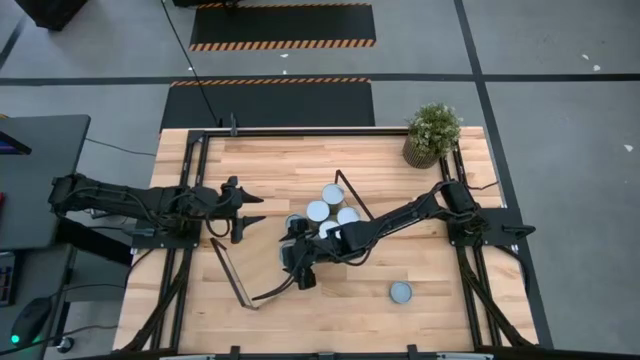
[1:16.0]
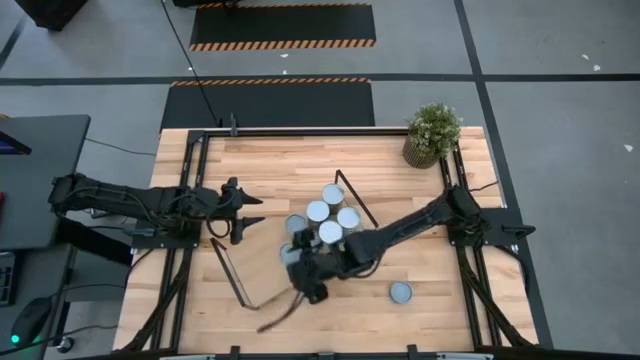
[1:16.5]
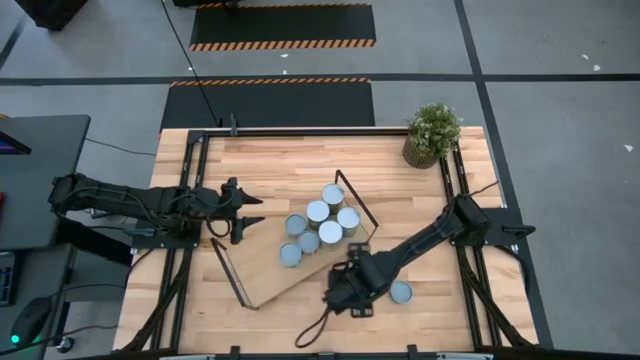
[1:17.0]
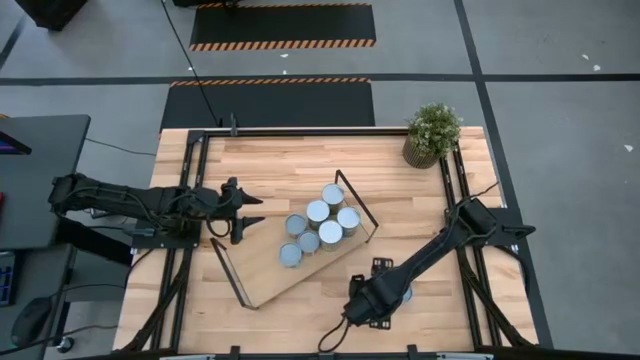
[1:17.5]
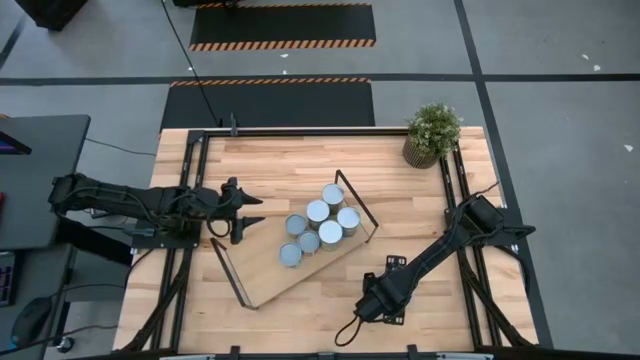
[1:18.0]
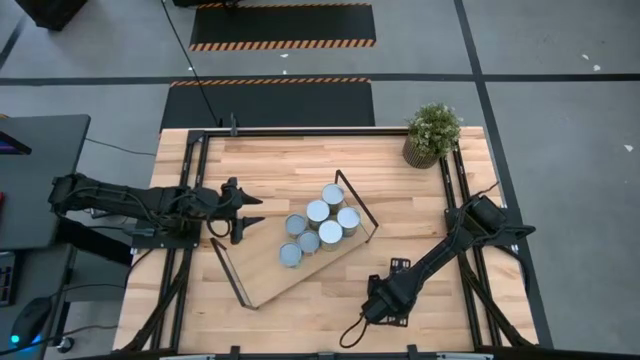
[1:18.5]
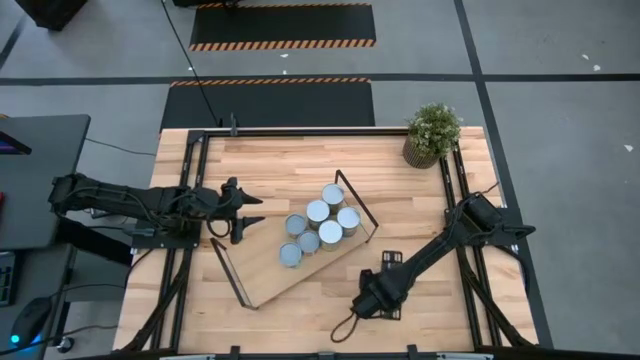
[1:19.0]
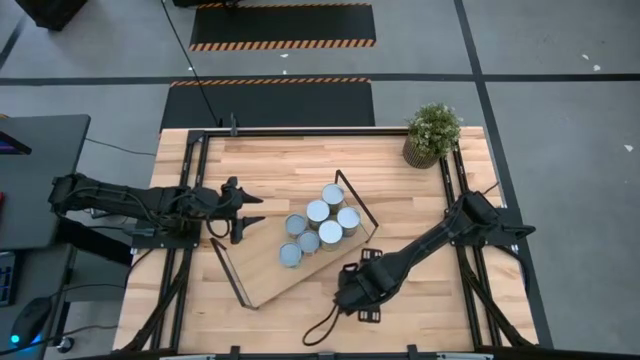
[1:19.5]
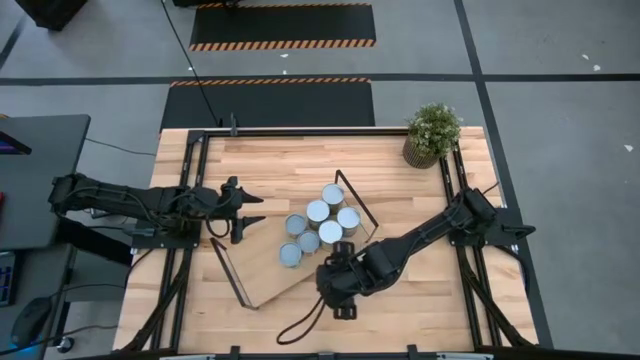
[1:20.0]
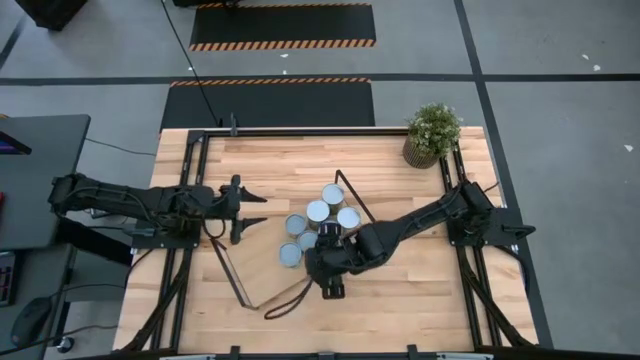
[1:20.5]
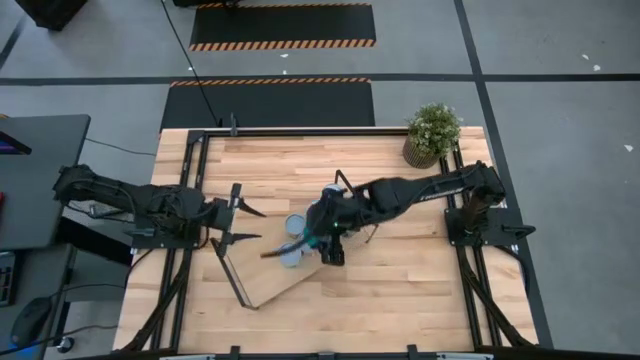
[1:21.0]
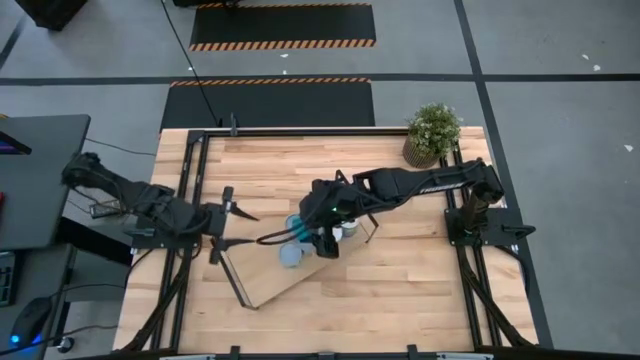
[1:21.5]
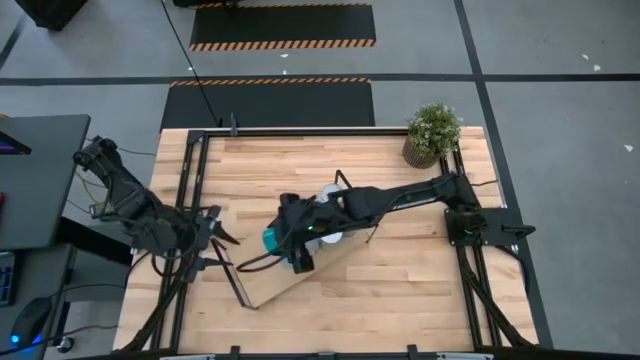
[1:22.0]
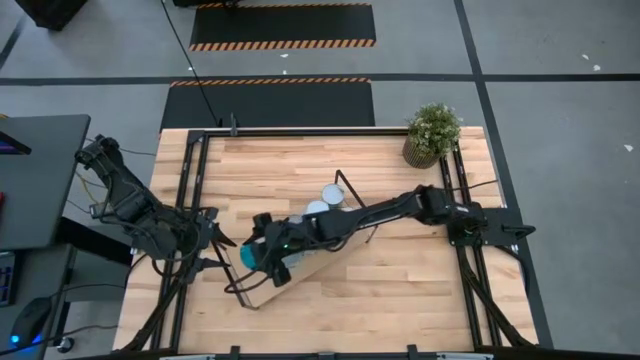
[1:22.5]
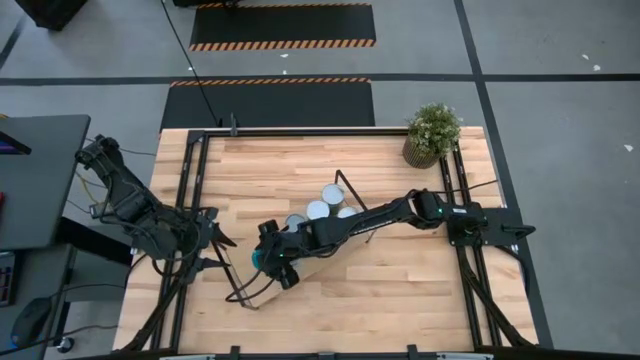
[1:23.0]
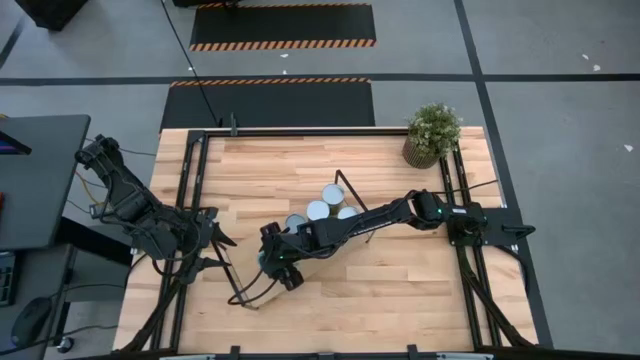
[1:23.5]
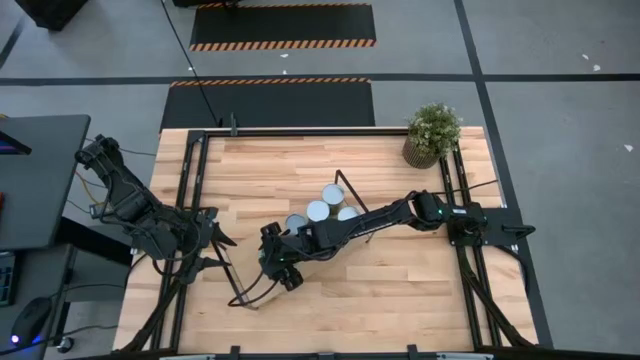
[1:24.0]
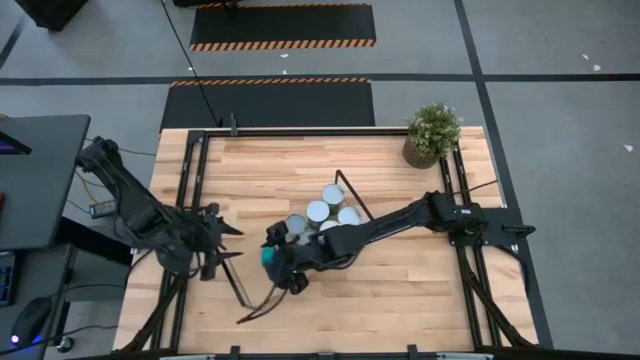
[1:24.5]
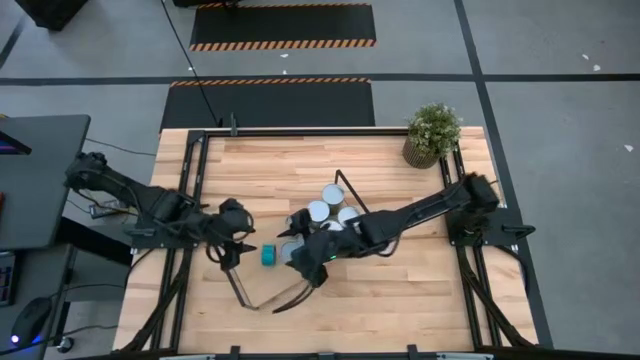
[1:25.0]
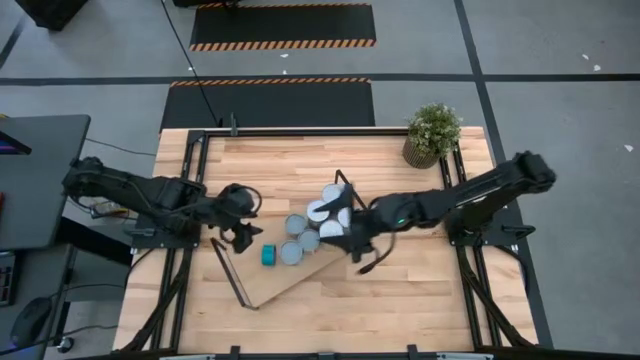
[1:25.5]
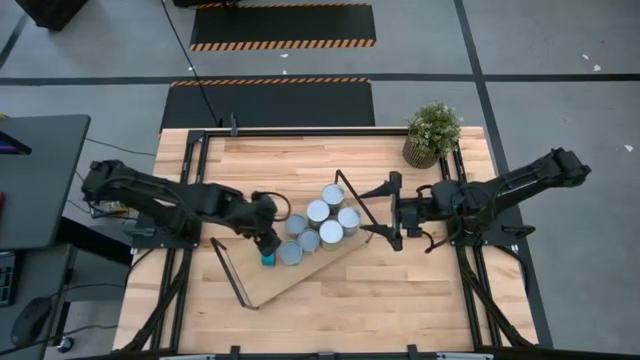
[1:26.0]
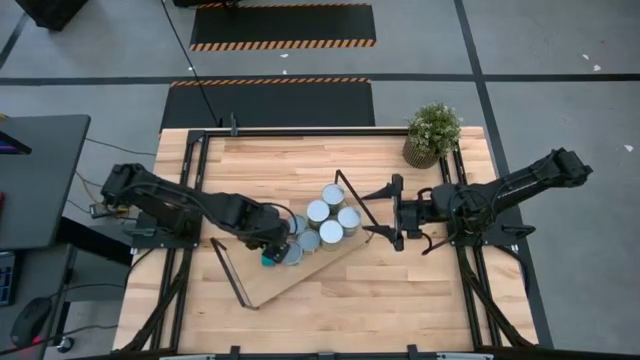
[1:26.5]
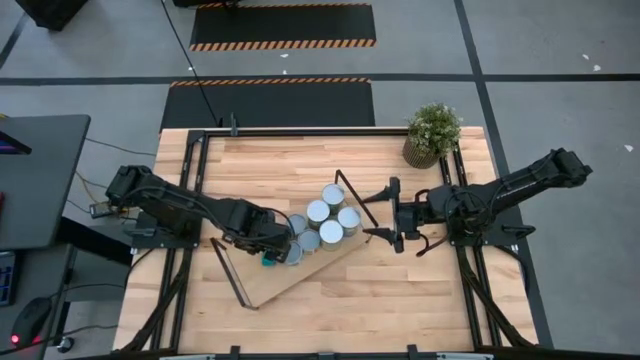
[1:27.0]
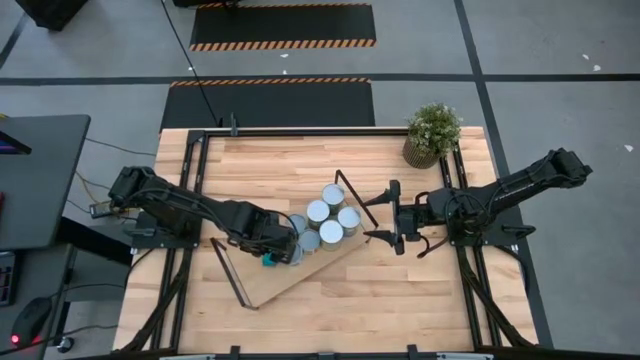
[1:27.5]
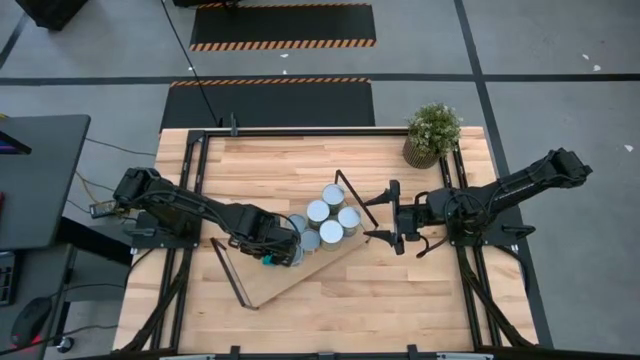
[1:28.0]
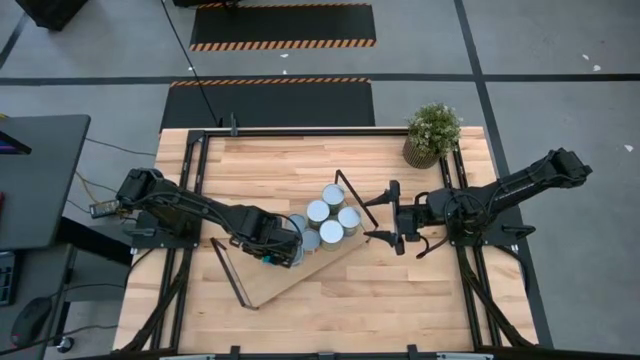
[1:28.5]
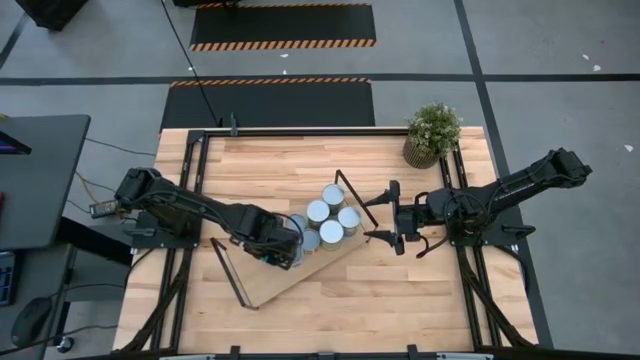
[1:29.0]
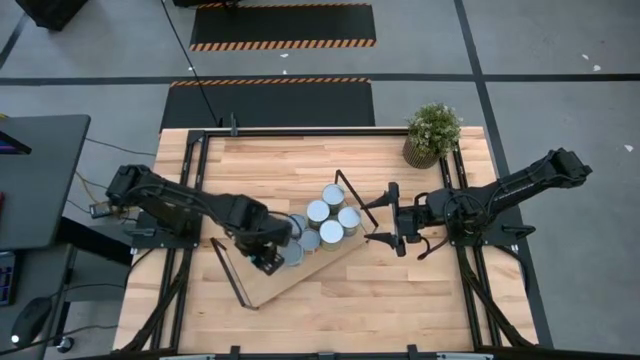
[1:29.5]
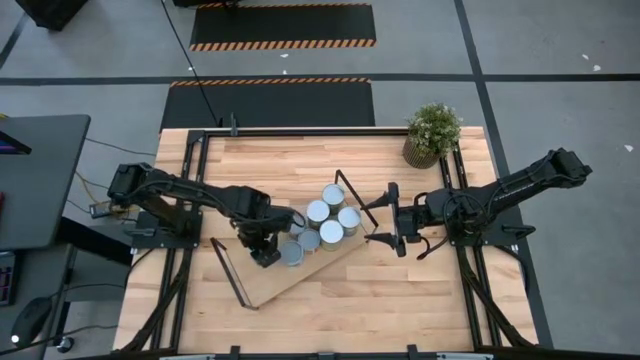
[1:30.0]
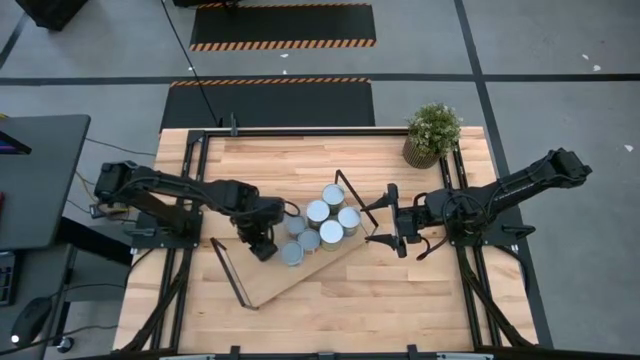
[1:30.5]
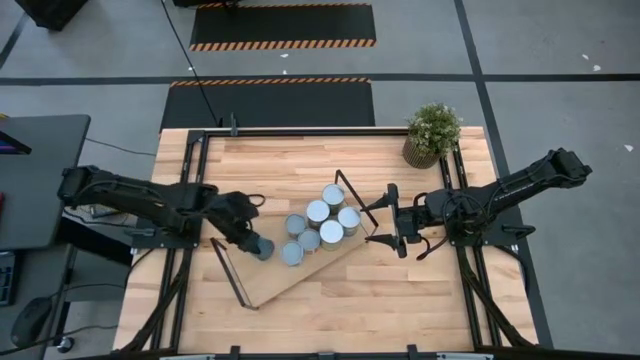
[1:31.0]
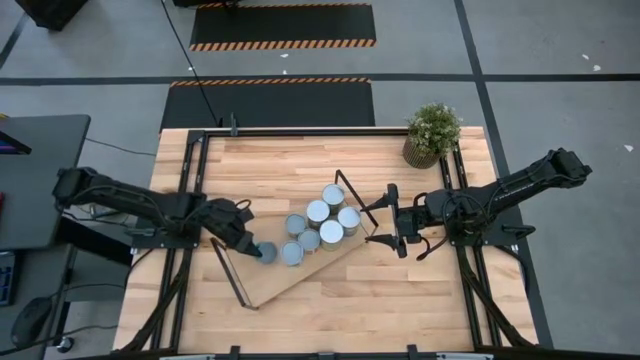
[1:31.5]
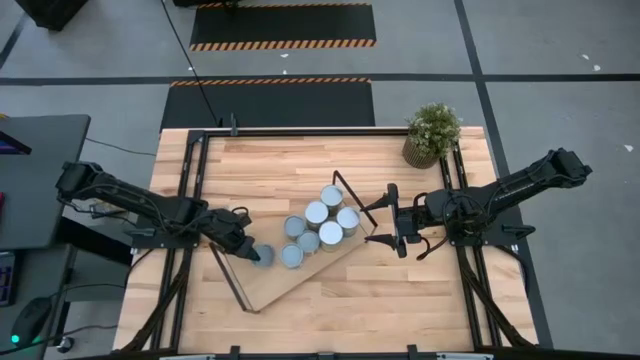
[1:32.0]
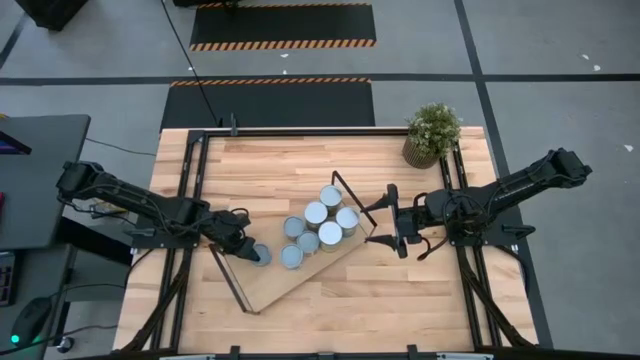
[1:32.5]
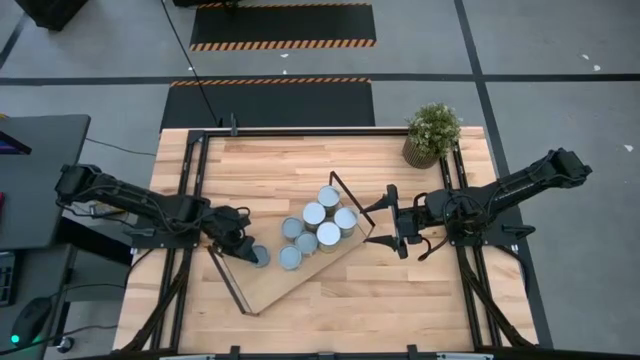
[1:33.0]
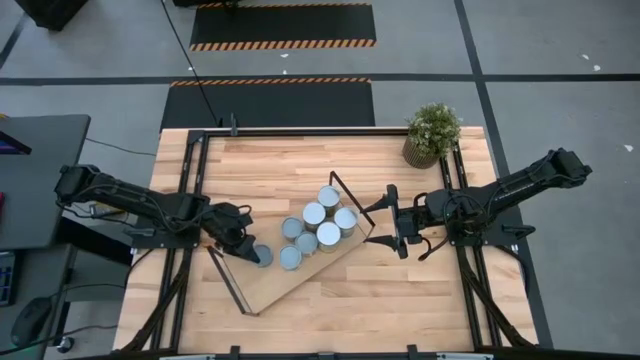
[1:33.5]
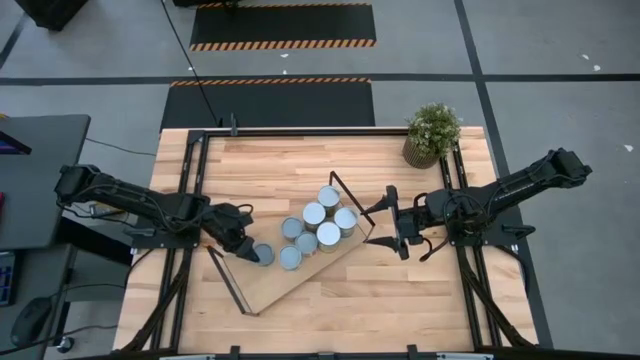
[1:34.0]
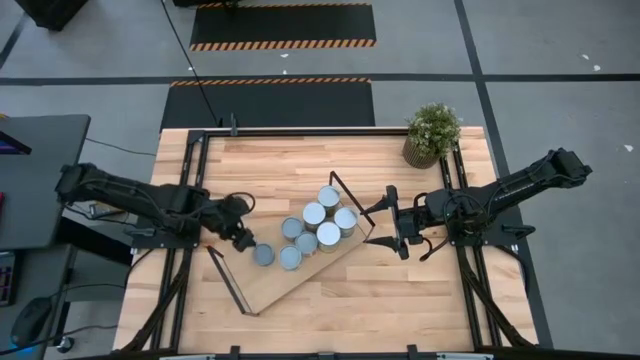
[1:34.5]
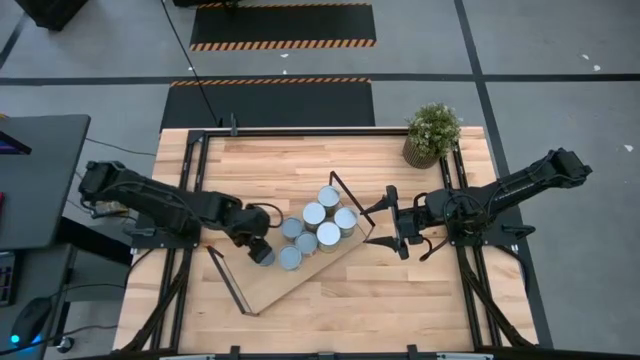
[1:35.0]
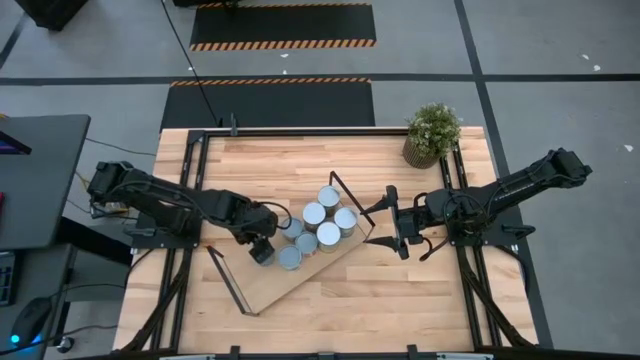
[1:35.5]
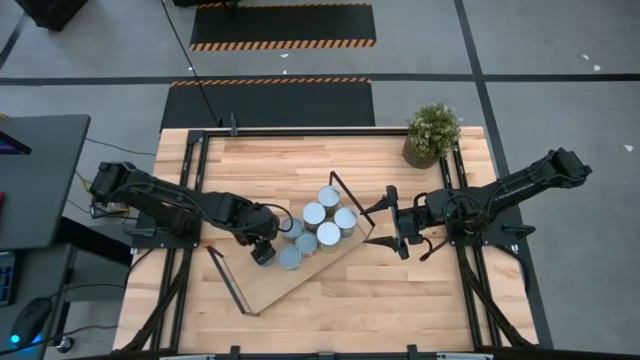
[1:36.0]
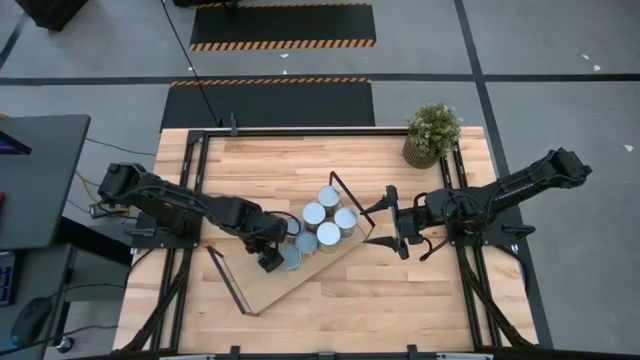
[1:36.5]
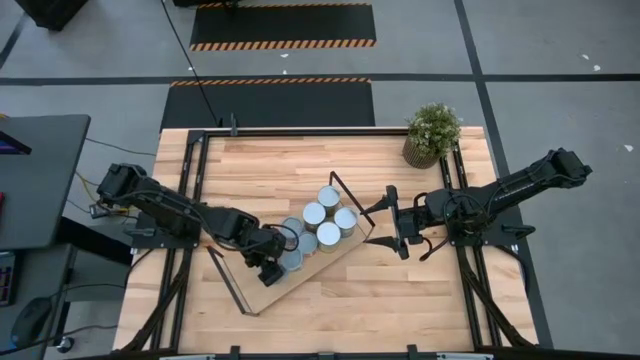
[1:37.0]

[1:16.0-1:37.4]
Task: Pick and place cans onto a shelf
Put the small can on the shelf
